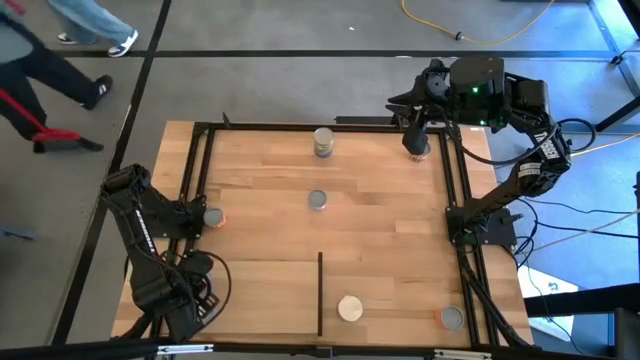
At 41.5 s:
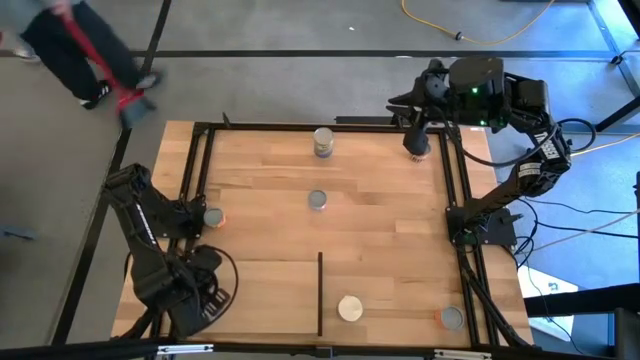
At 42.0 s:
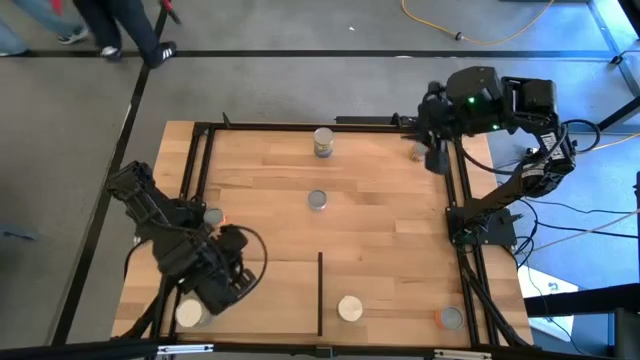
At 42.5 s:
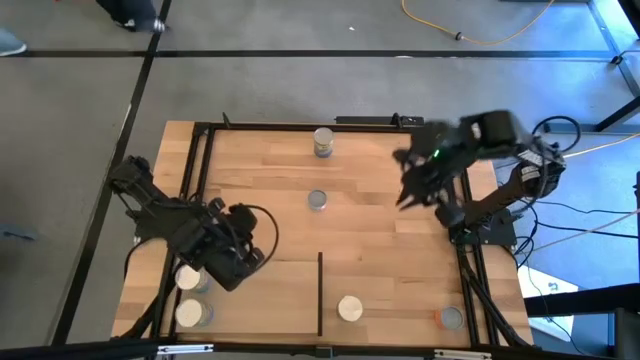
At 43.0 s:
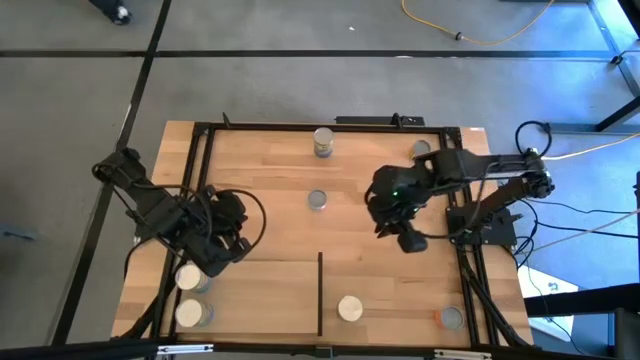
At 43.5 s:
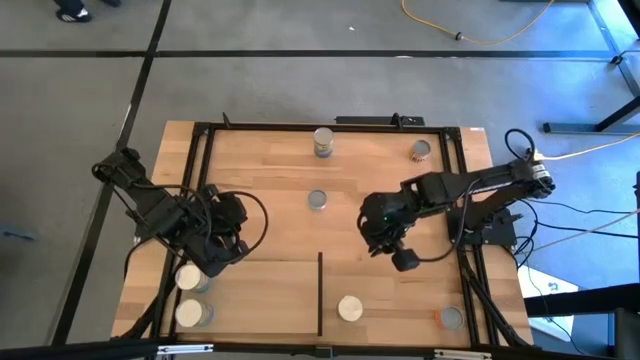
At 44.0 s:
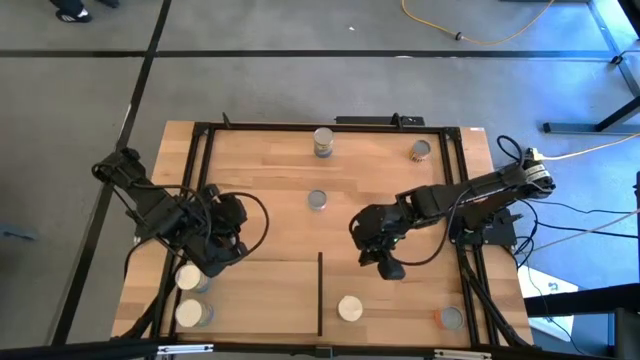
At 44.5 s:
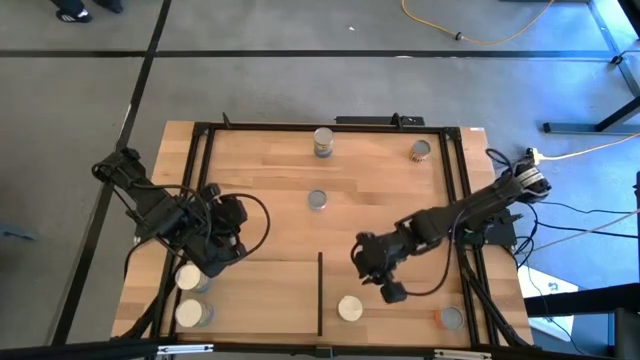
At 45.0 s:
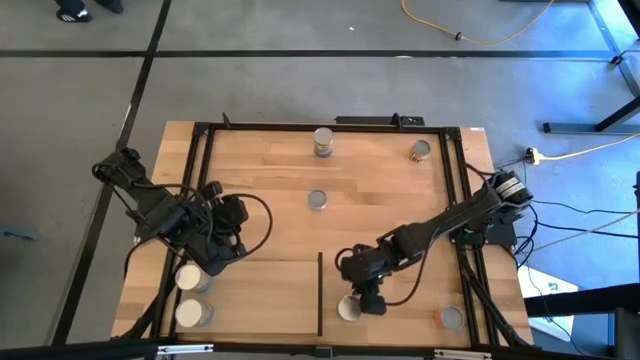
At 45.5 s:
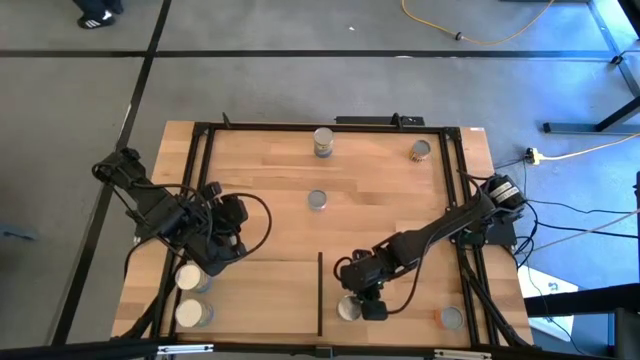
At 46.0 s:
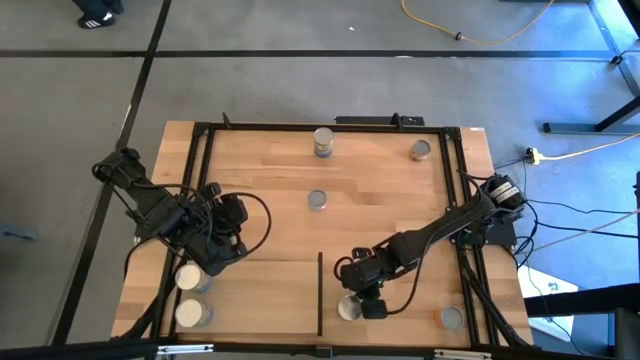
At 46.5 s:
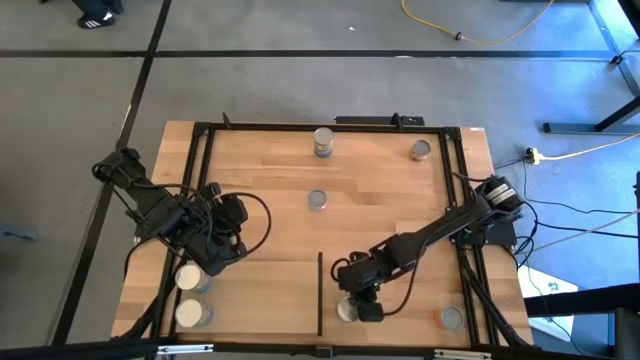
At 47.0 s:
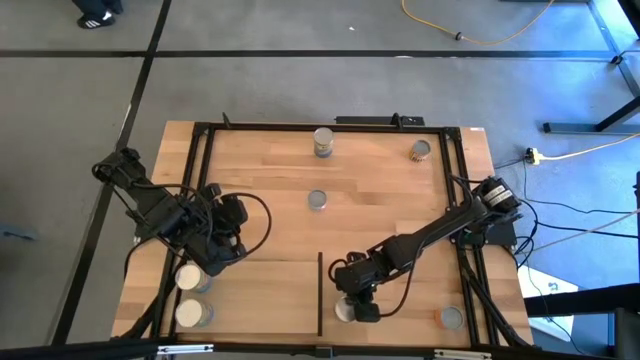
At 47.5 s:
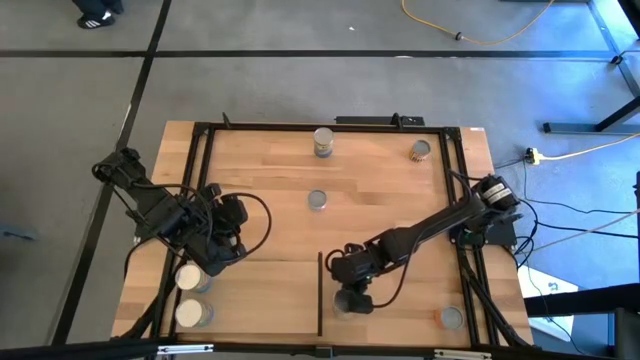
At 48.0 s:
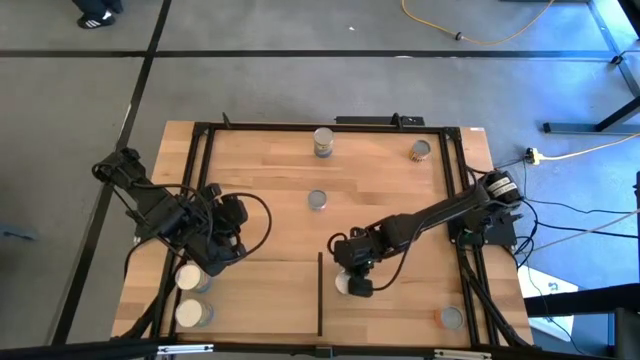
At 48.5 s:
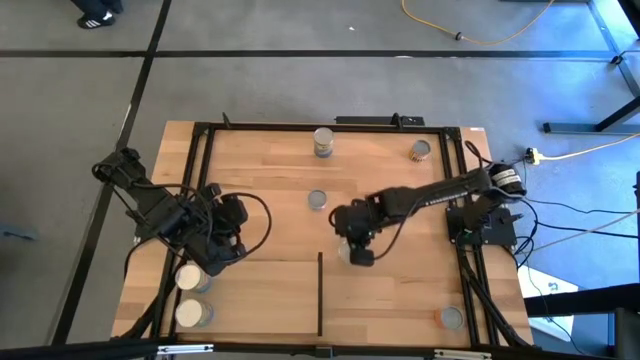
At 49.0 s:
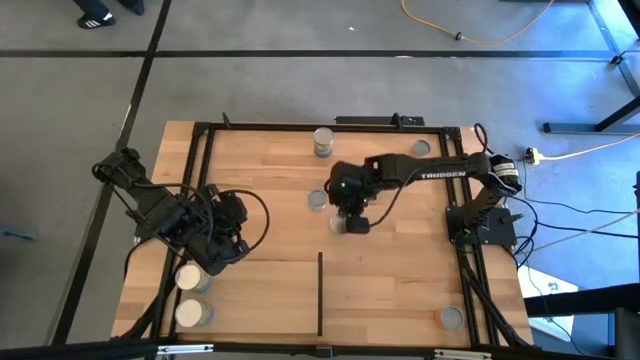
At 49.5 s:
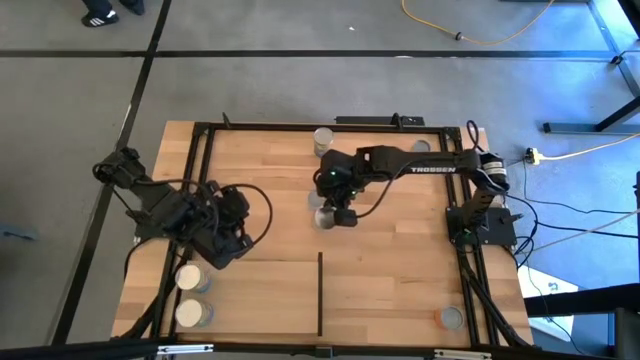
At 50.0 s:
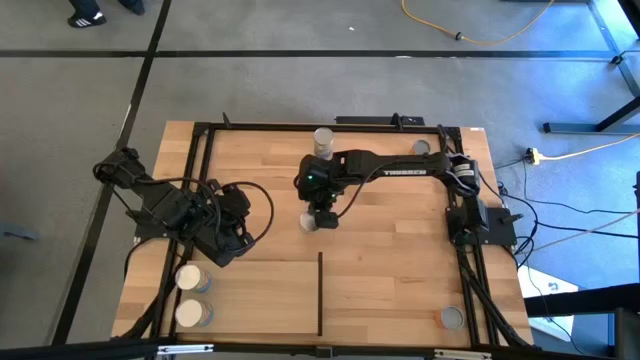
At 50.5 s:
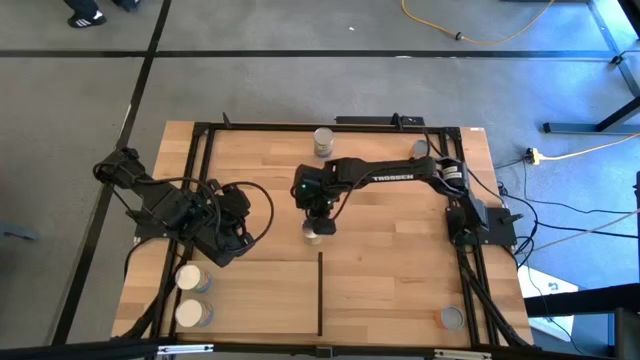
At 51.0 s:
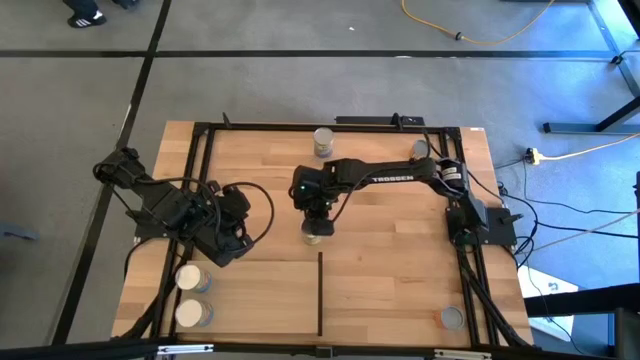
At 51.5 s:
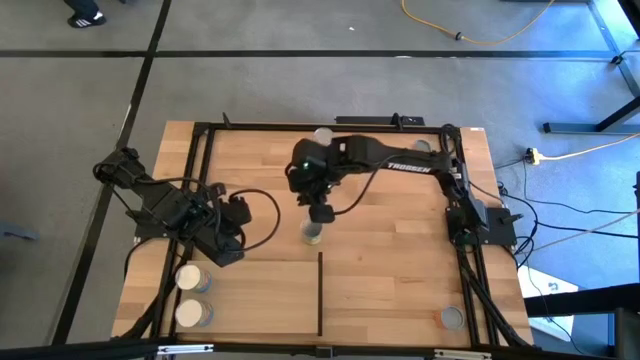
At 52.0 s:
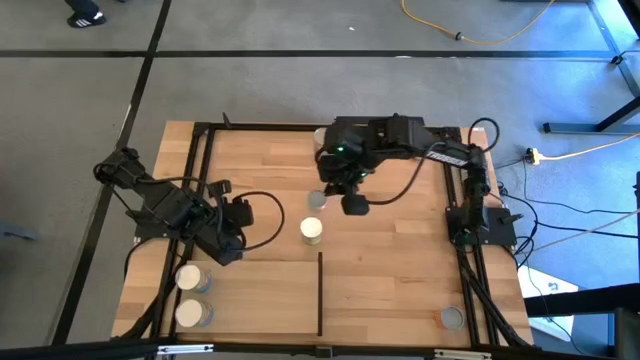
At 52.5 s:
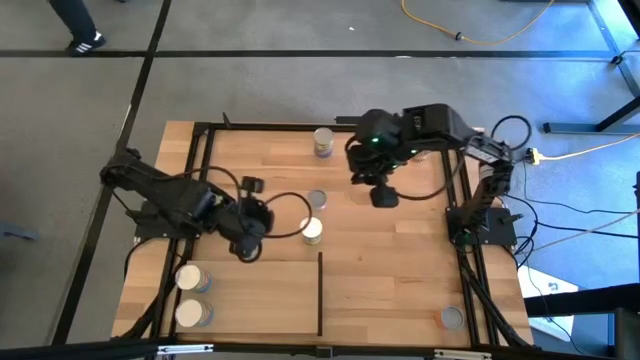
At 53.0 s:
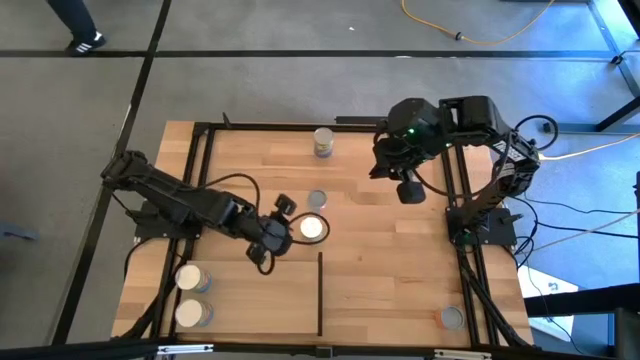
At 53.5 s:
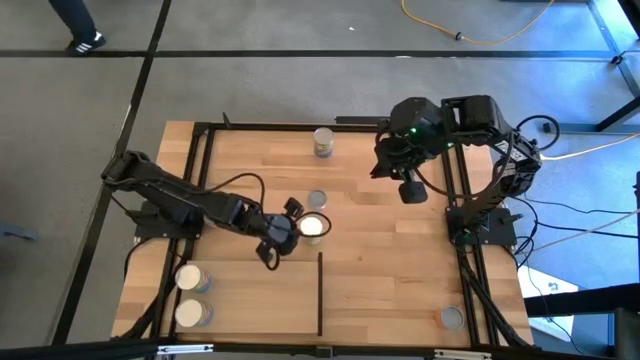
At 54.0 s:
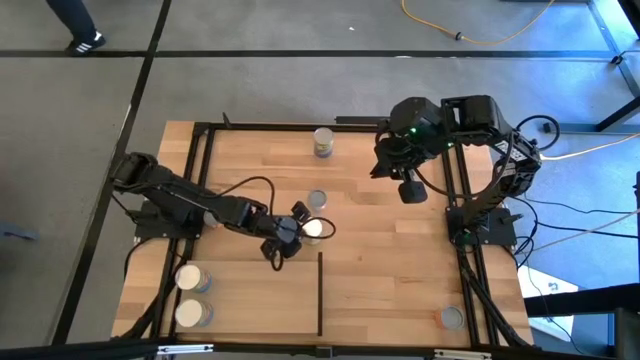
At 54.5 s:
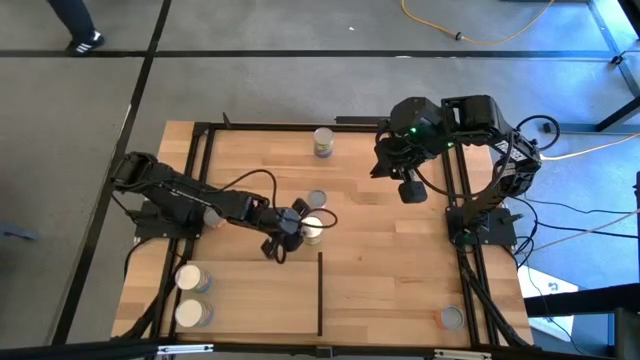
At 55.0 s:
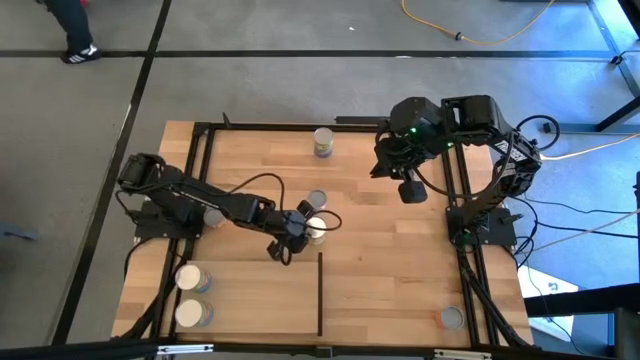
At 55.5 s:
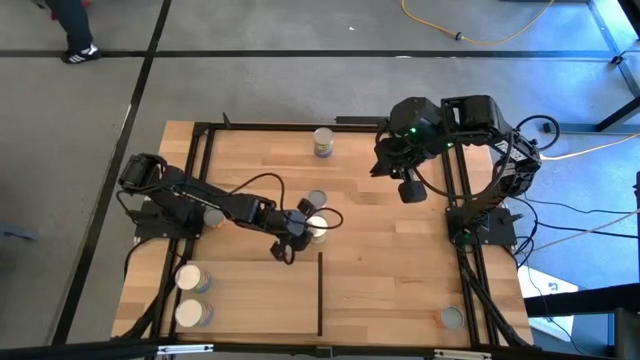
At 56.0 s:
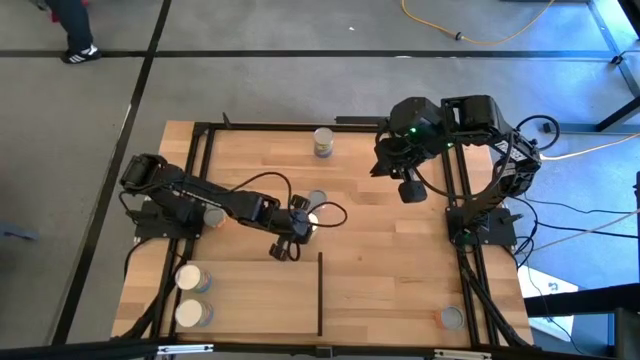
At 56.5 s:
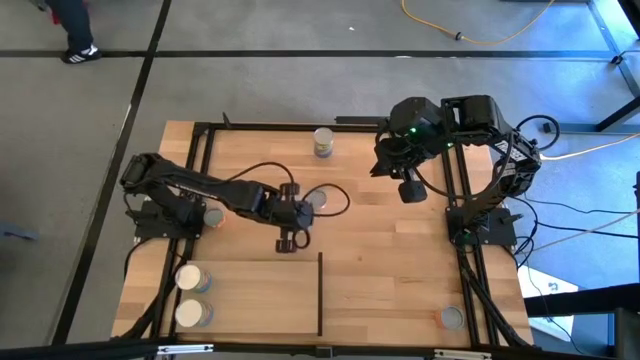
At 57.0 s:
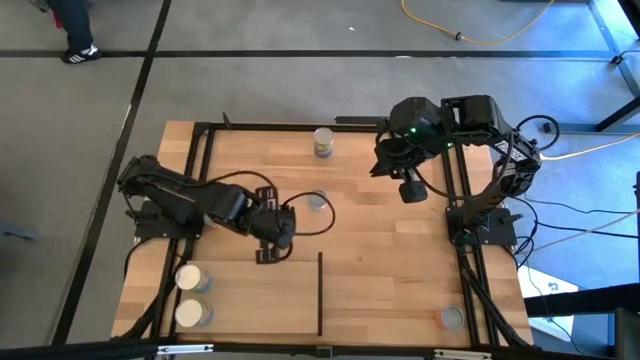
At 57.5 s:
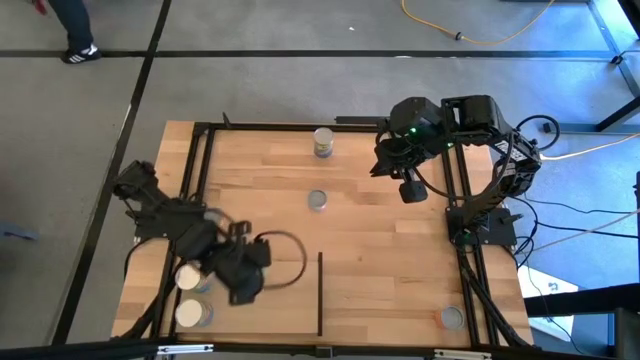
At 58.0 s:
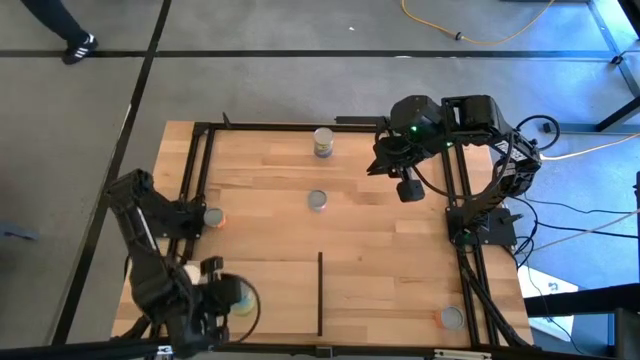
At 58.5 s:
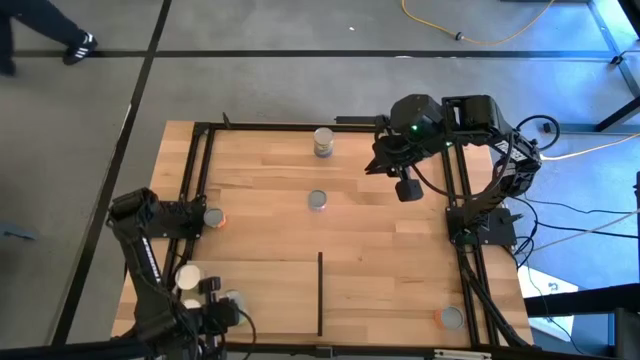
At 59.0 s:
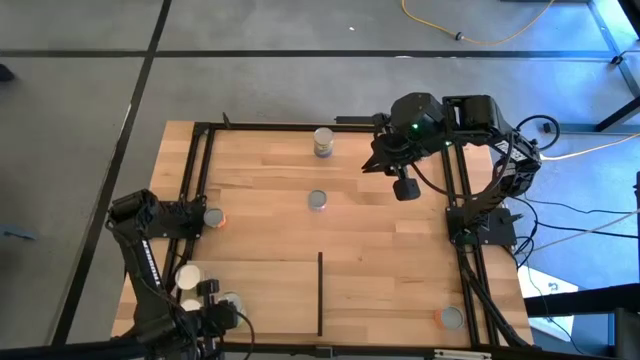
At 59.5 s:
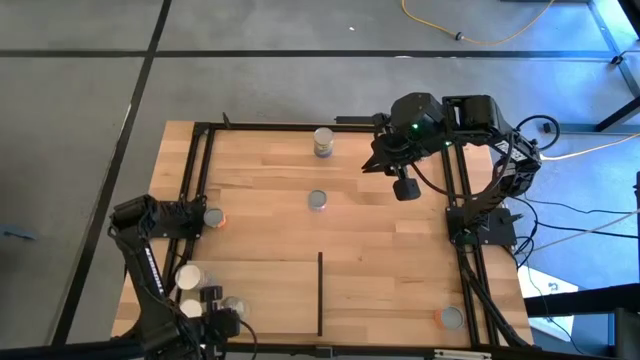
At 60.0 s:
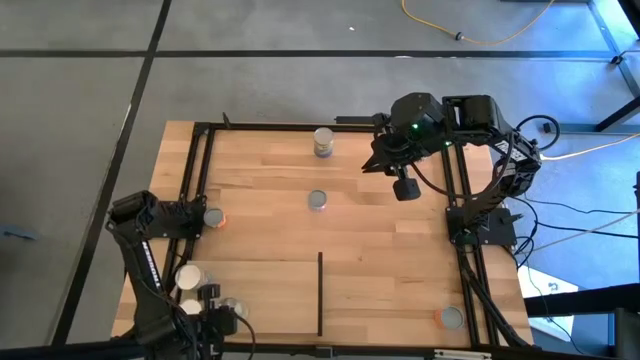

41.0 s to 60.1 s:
Task: Pick and place cans onto a shelf
Put the canned carrots on the shelf

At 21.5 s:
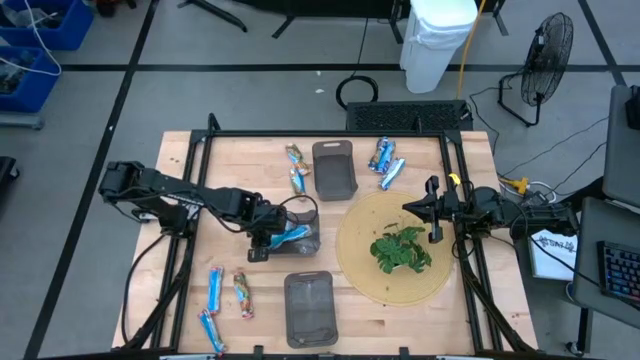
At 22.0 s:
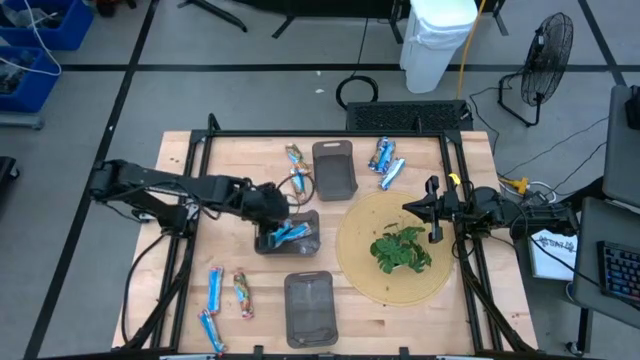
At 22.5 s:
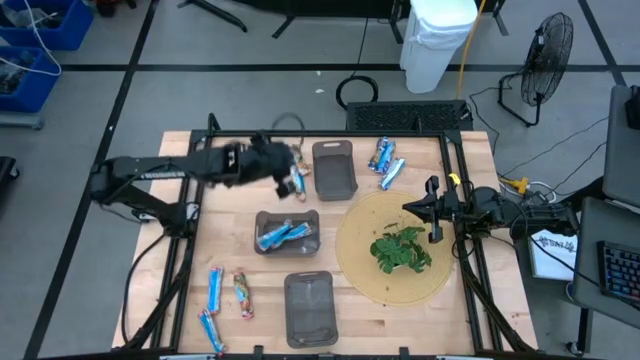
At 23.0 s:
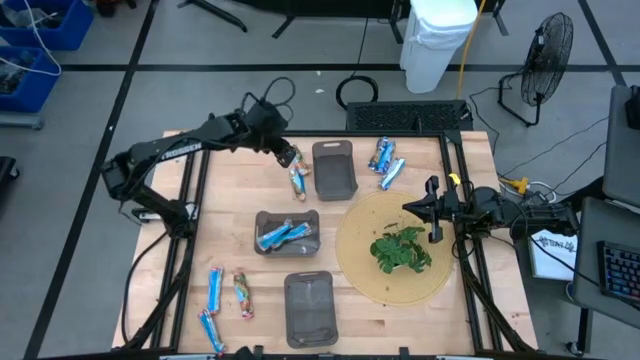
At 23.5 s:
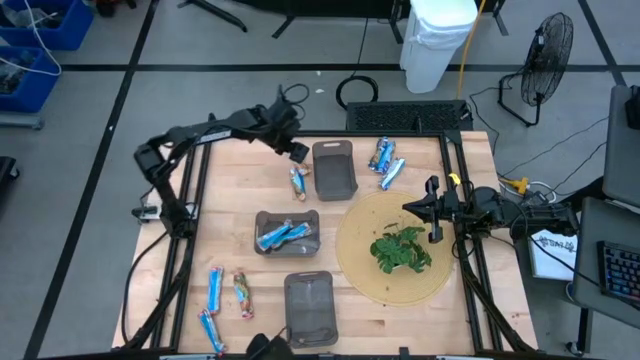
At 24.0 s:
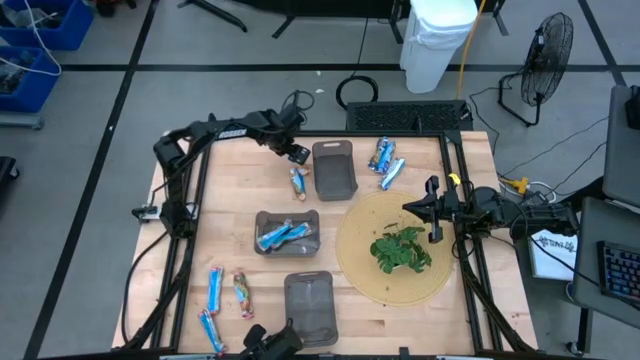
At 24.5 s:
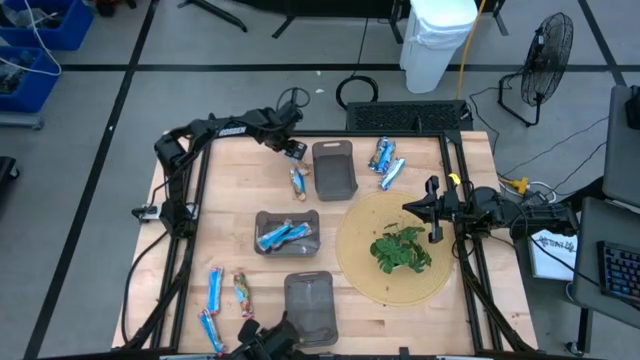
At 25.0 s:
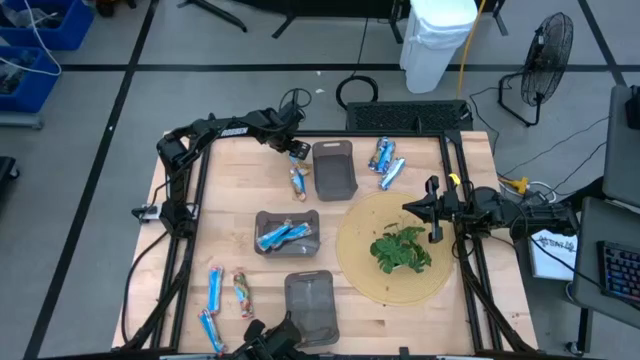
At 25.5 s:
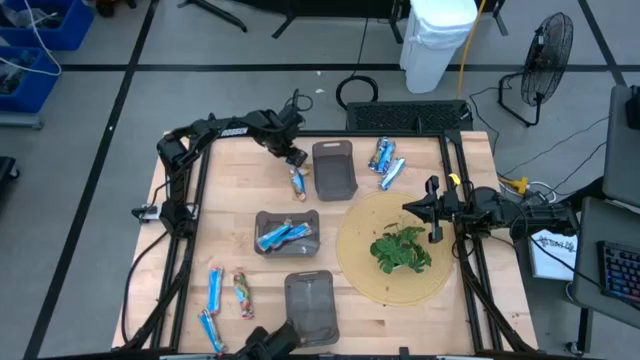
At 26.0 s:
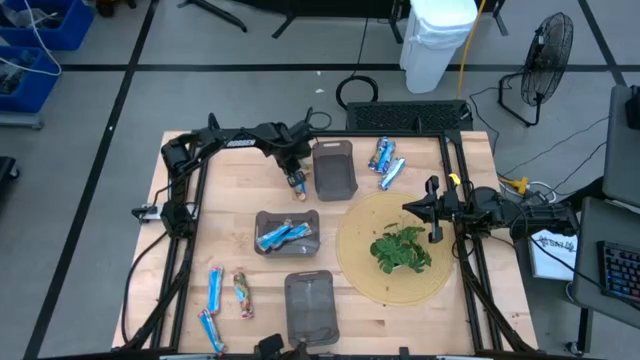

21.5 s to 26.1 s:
Task: Pick and place Granola Bars by type
Put the yellow granola bar into the middle black bin
